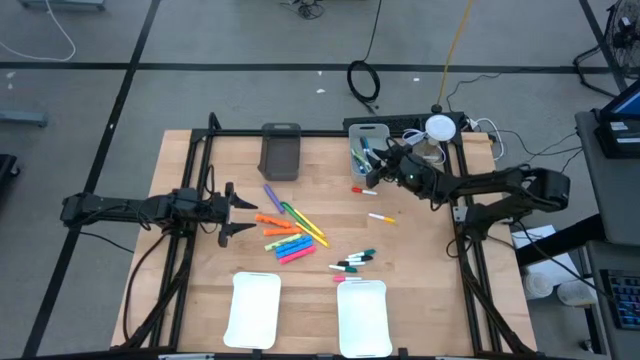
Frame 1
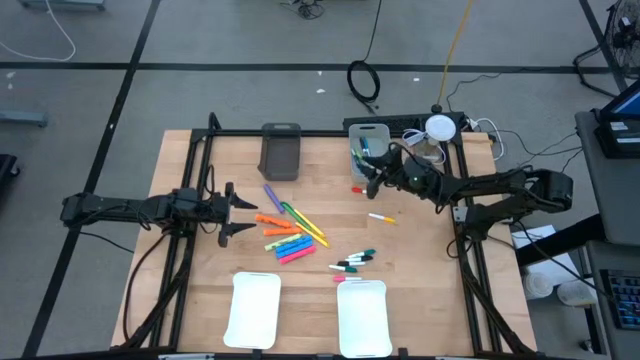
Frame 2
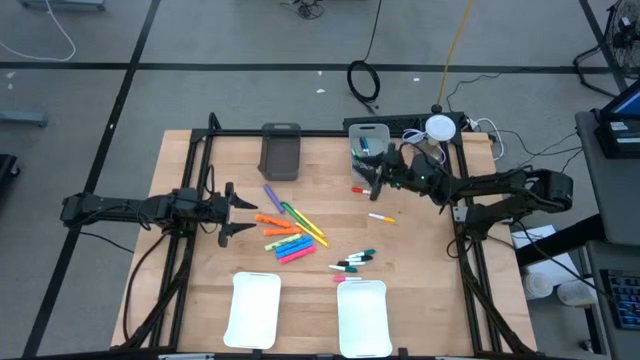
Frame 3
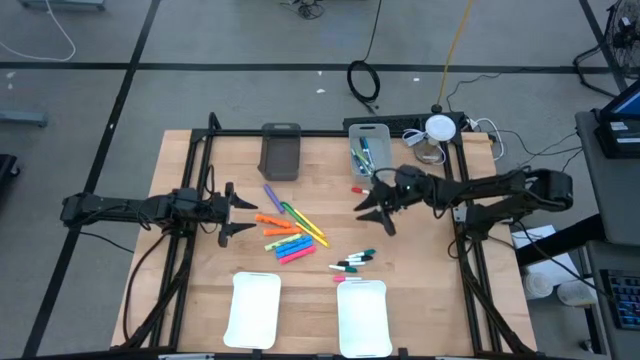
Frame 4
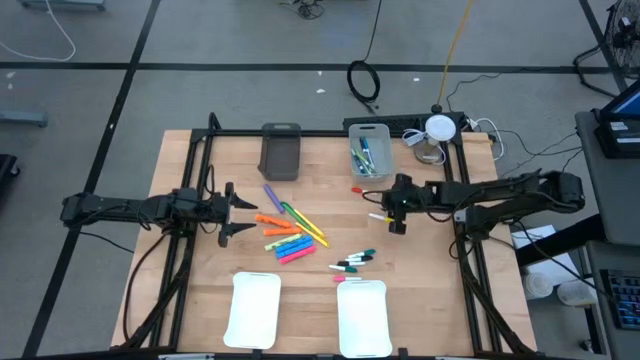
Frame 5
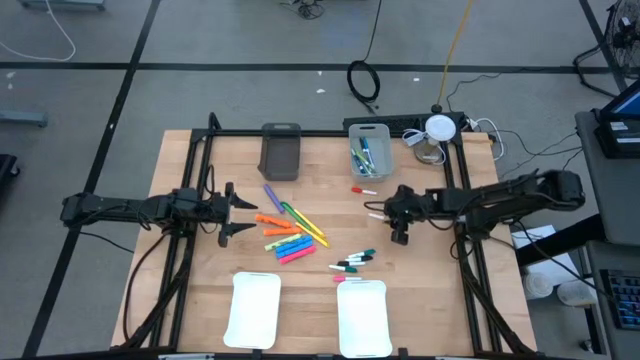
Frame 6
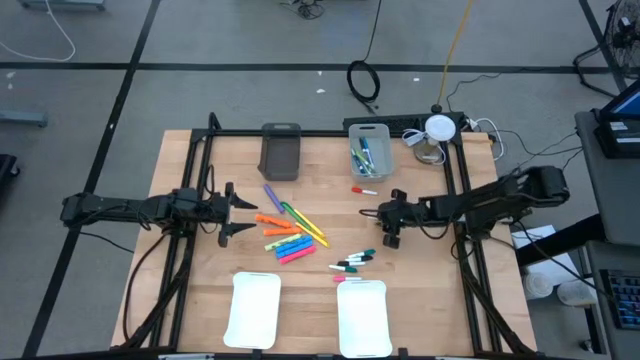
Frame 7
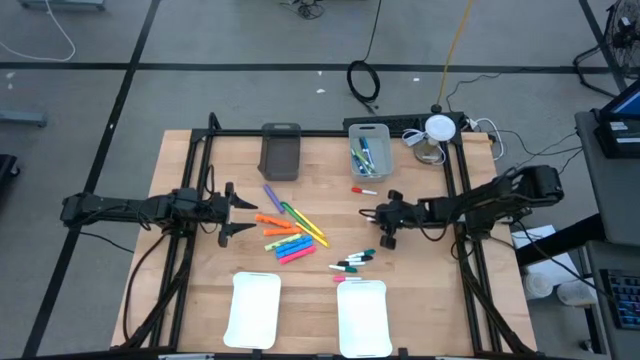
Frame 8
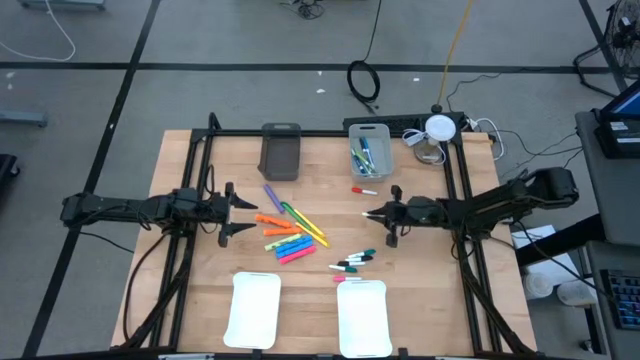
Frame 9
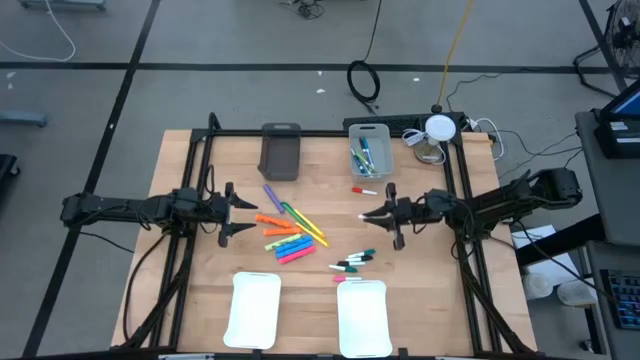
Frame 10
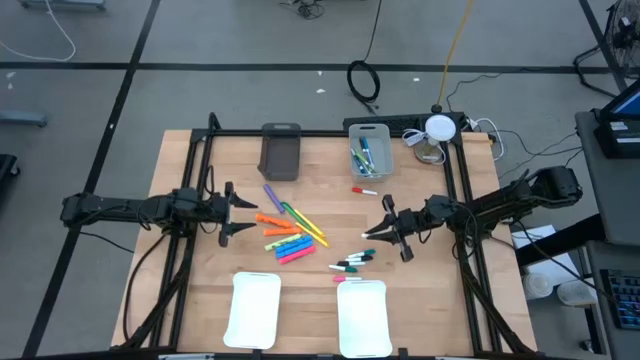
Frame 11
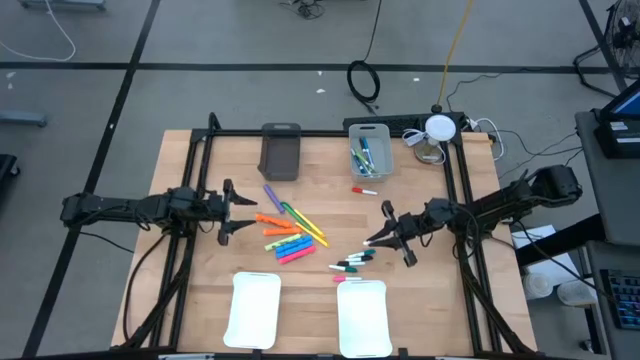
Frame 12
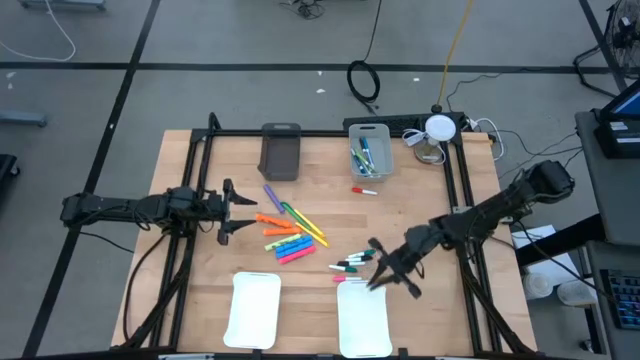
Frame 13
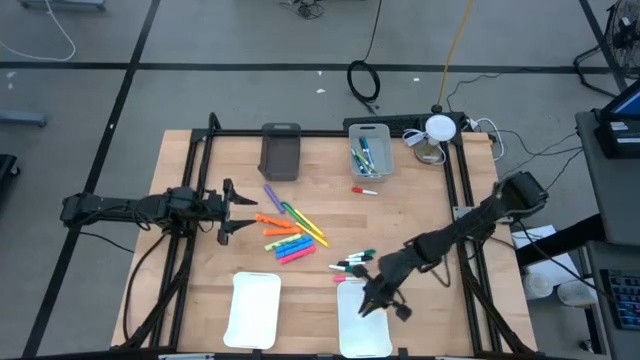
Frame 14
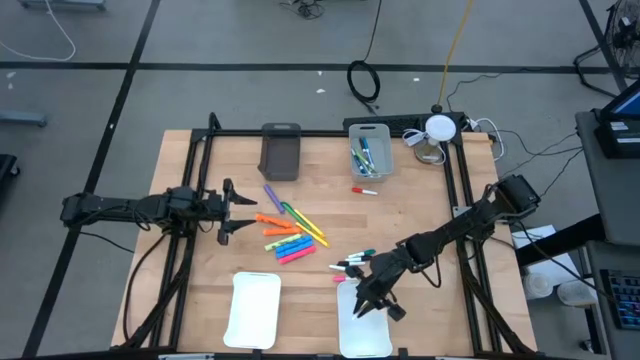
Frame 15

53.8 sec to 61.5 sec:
Task: Pick & Place Markers
Put the yellow highlighter pen into the right white bin

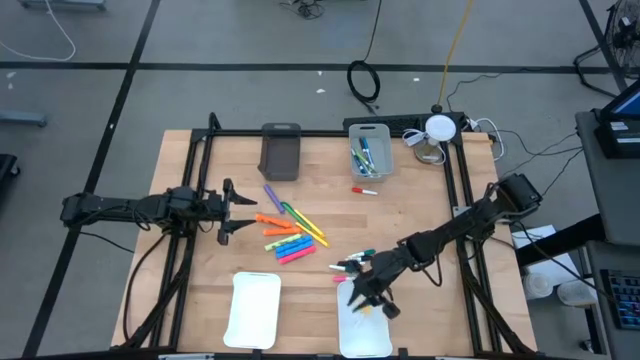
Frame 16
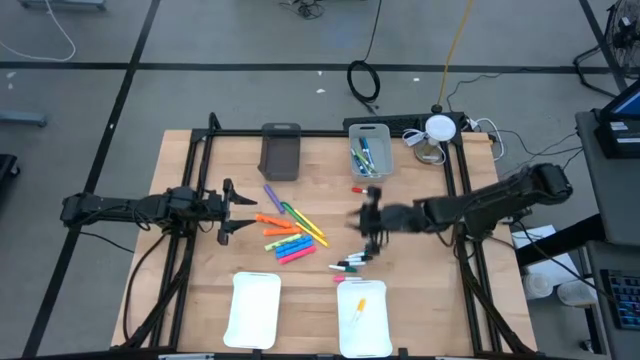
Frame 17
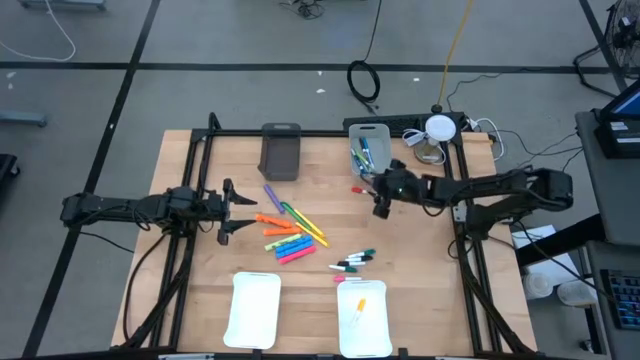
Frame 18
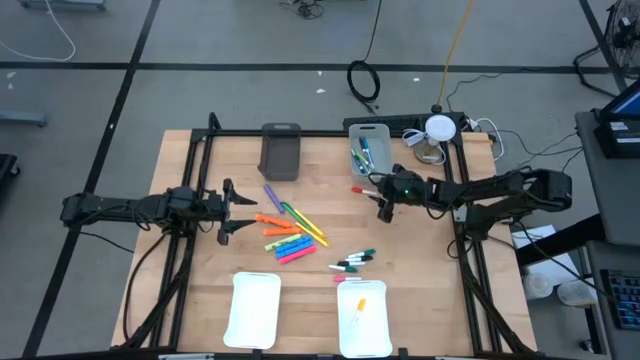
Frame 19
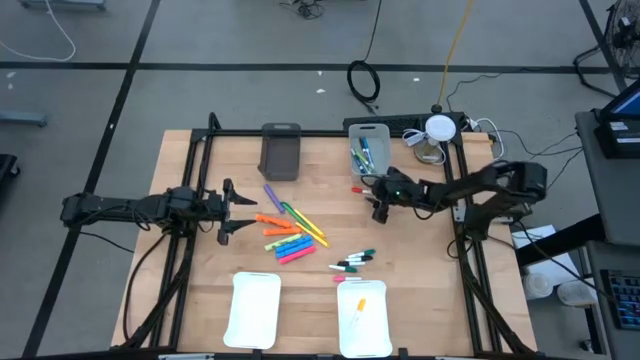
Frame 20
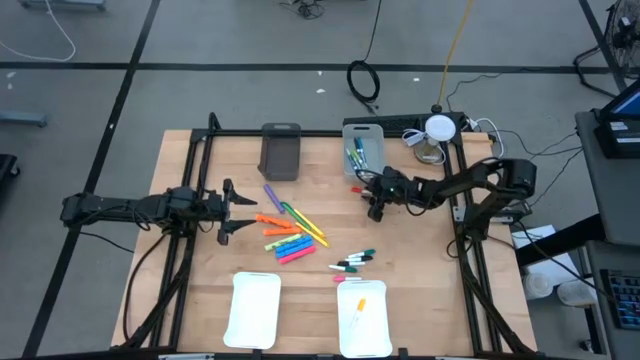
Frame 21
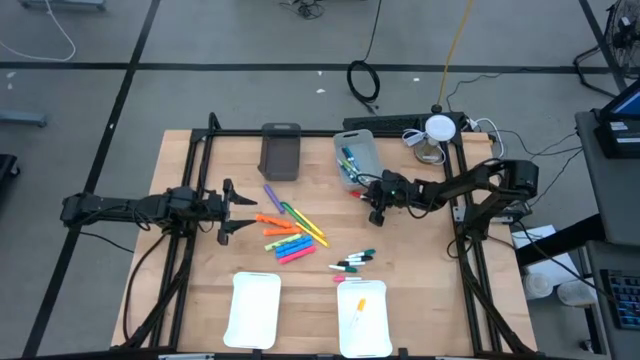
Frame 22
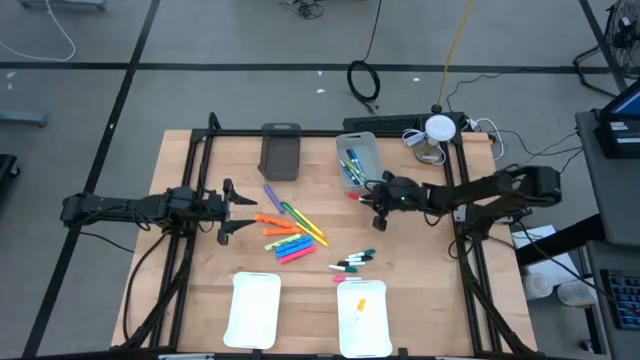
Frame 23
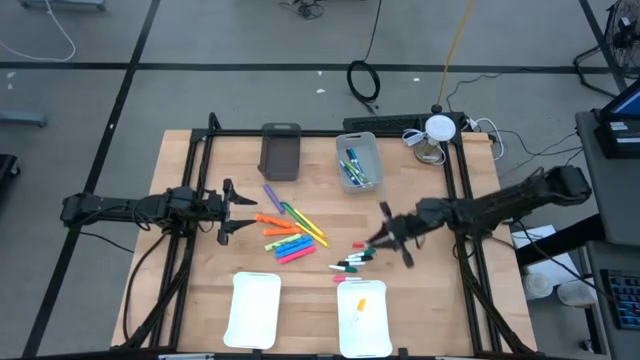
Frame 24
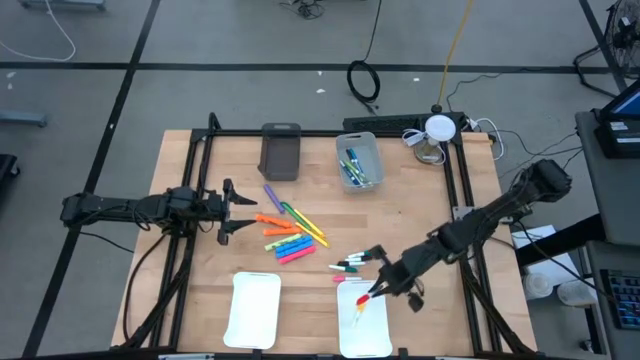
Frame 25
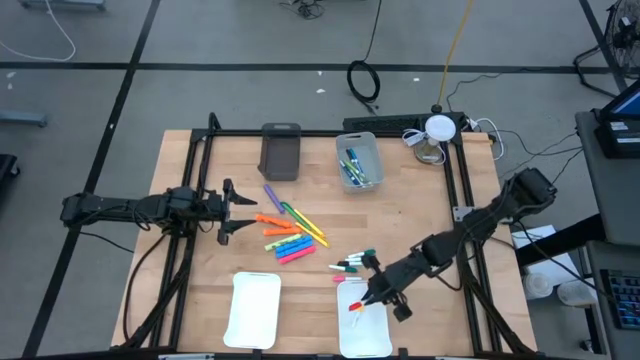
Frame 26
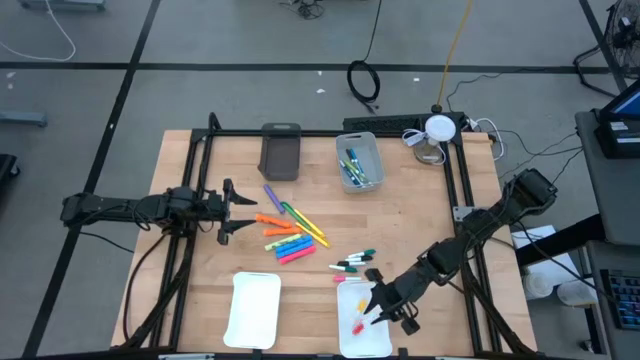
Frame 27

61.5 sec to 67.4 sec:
Put the red highlighter pen into the right white bin

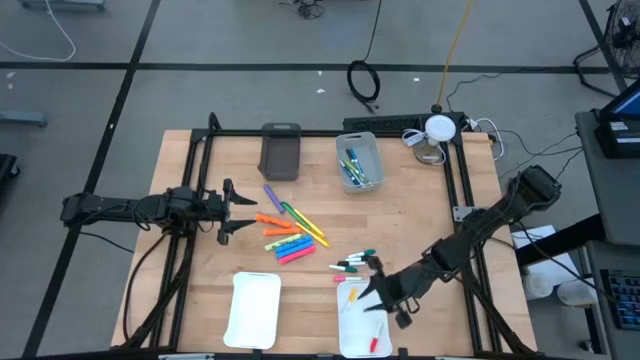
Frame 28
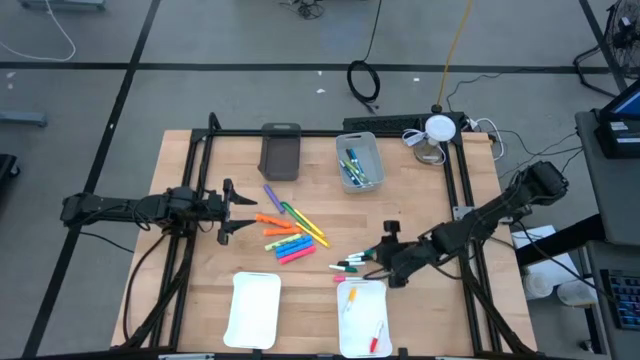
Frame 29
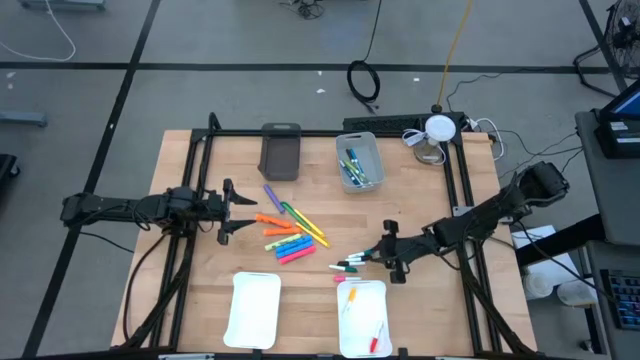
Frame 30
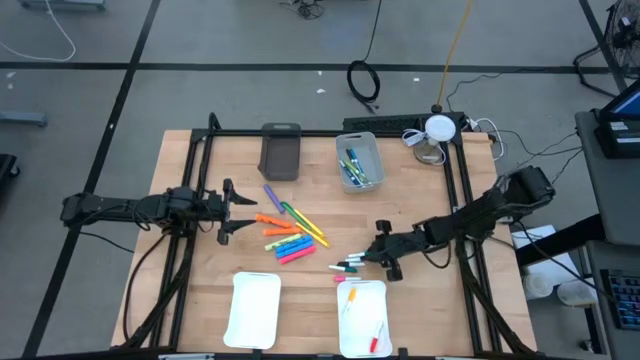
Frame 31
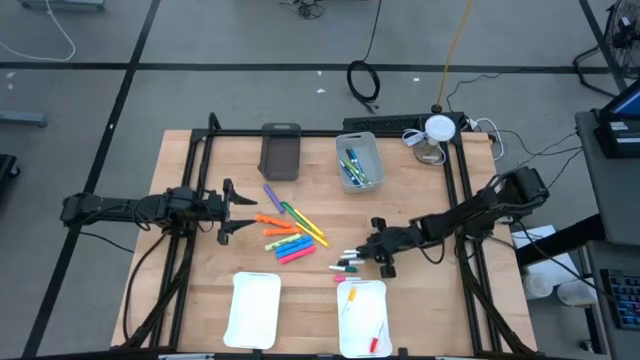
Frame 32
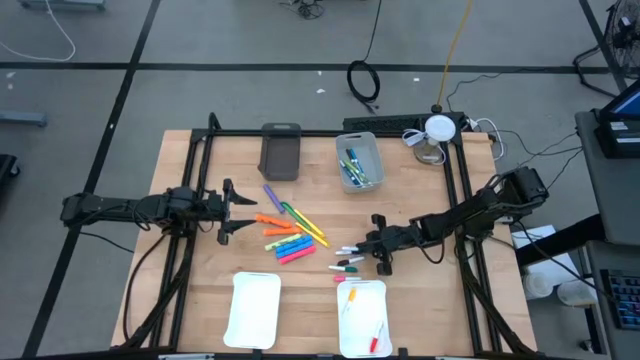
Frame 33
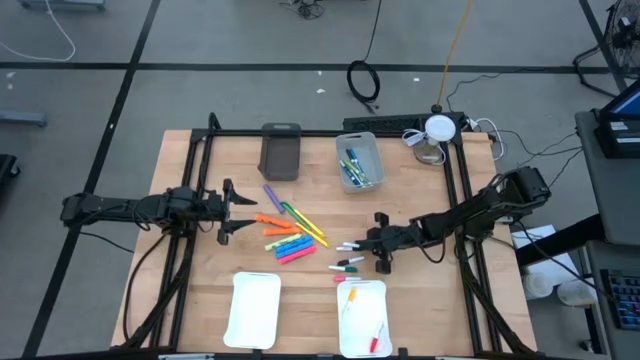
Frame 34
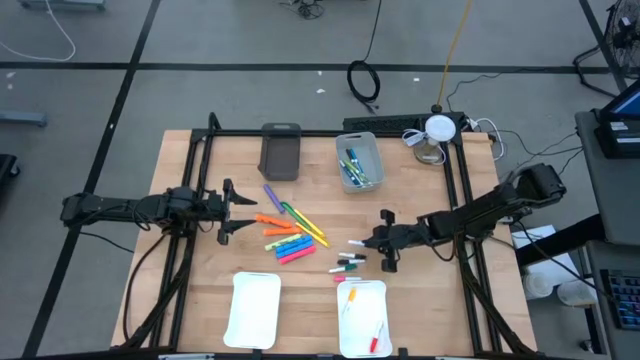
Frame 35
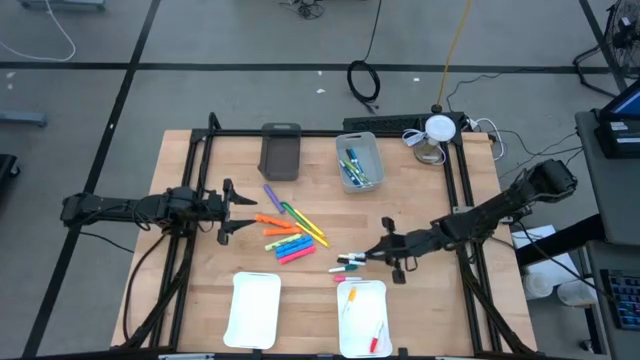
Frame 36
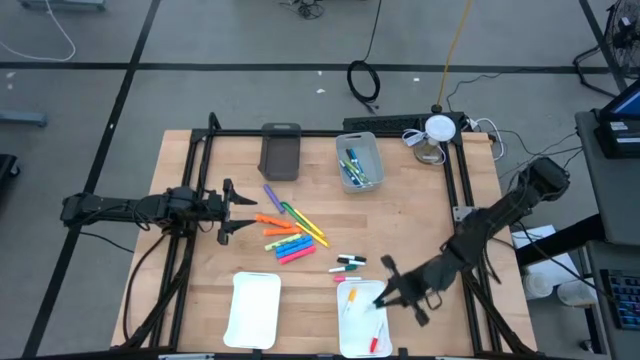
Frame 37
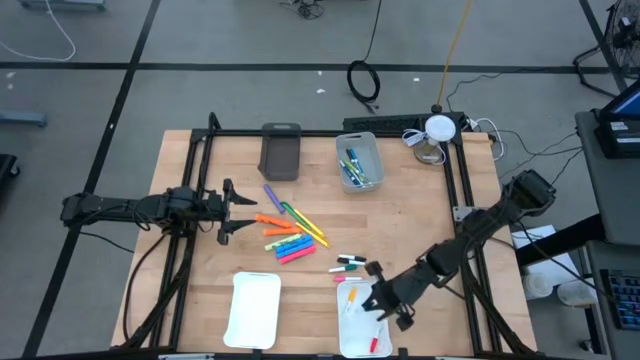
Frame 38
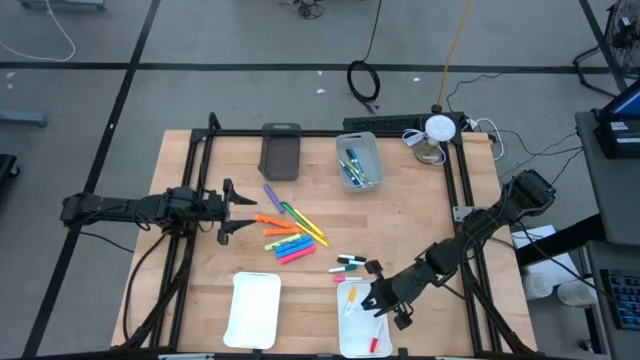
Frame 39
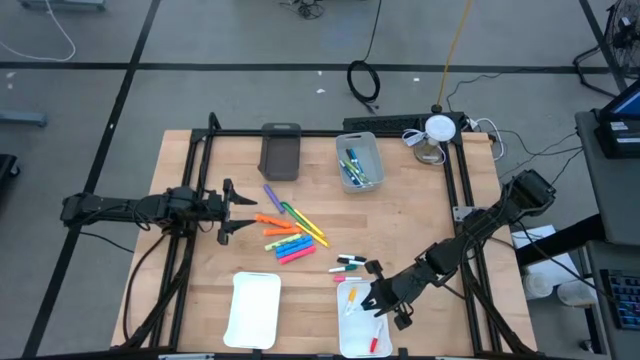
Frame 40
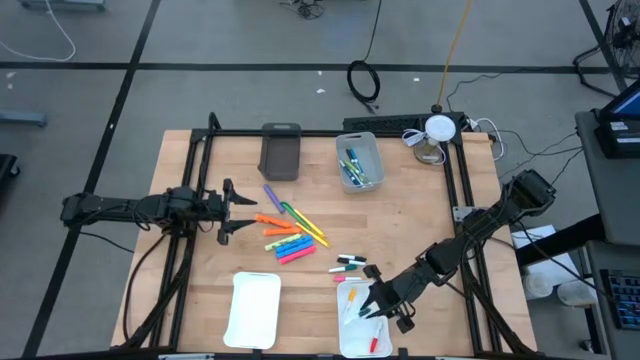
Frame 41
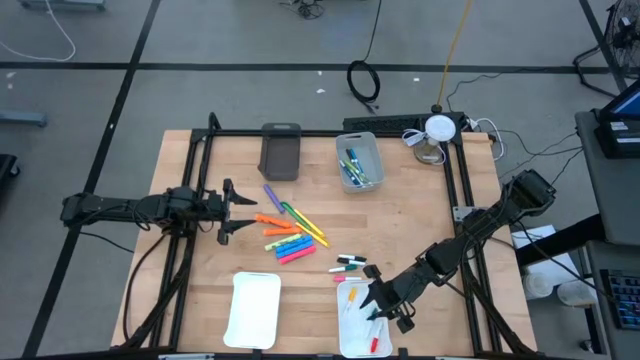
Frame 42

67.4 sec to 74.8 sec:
Put the top green highlighter pen into the right white bin
